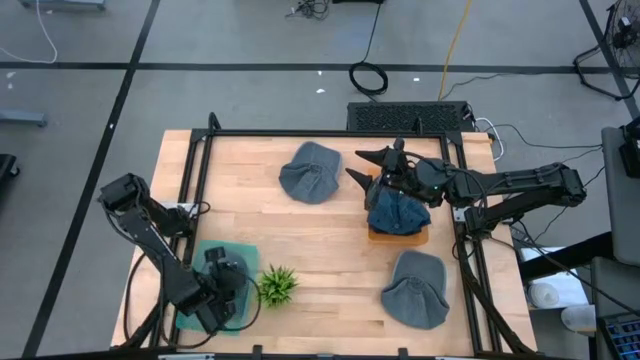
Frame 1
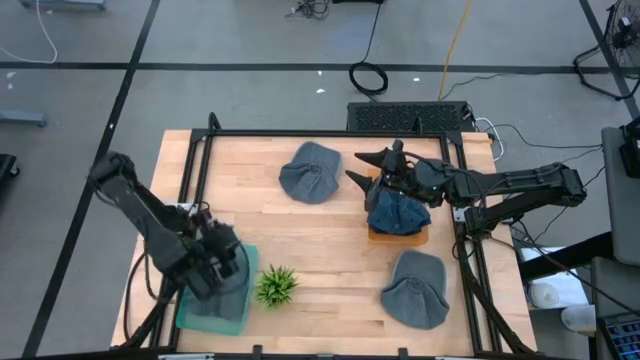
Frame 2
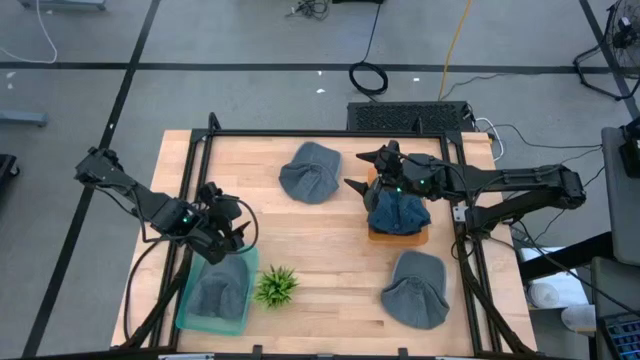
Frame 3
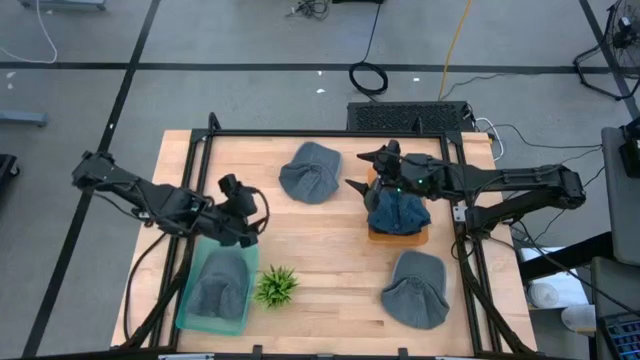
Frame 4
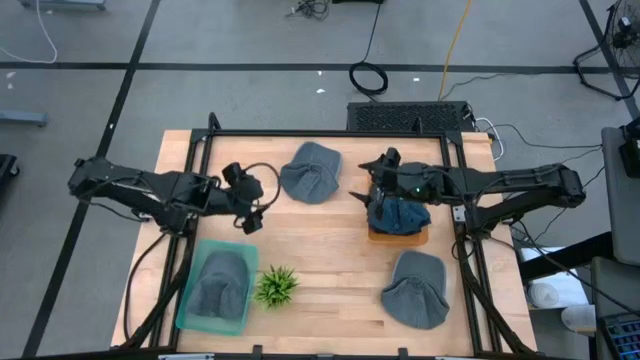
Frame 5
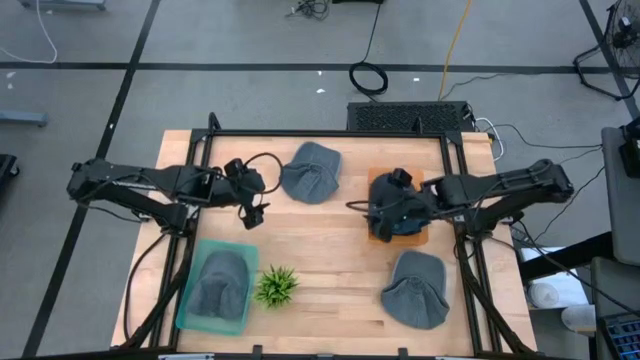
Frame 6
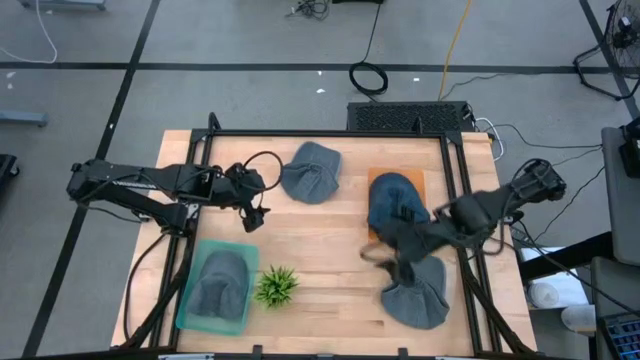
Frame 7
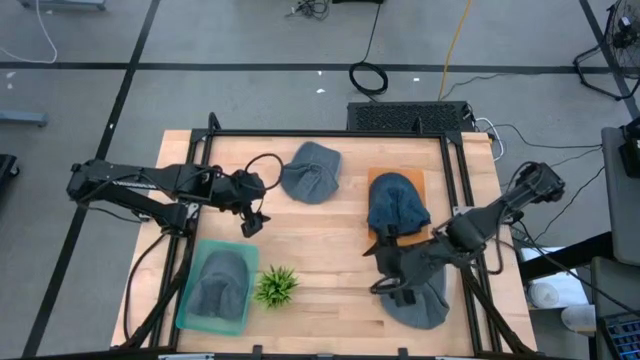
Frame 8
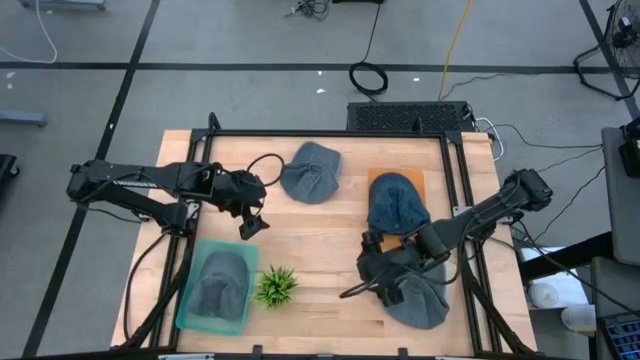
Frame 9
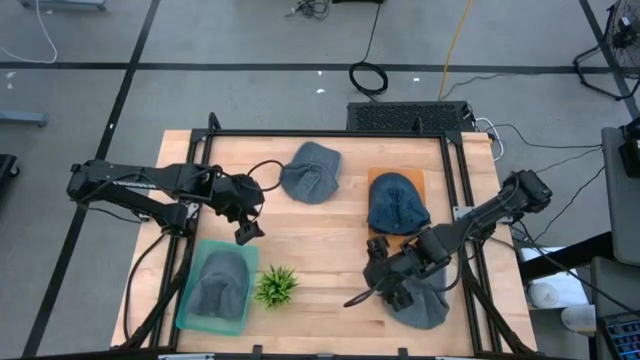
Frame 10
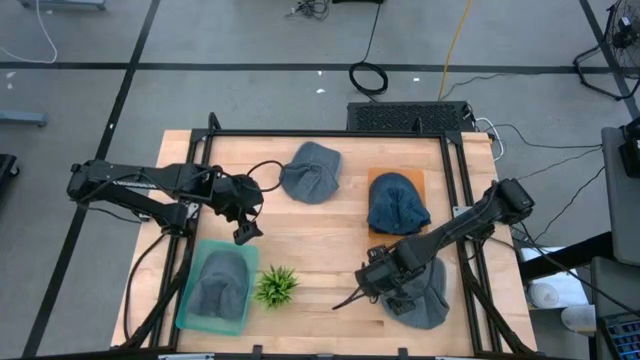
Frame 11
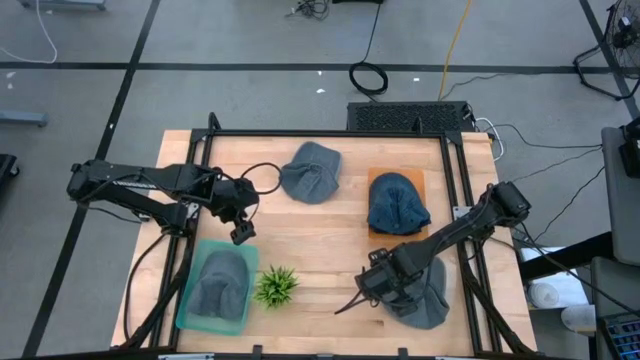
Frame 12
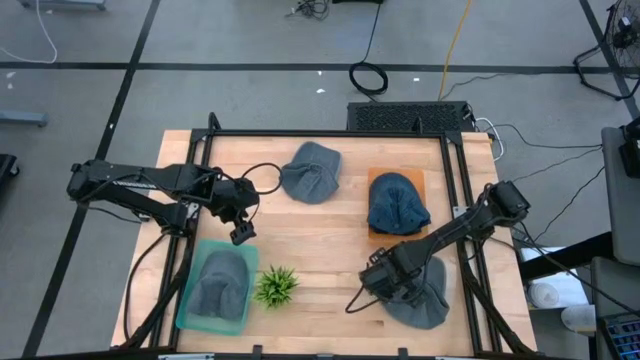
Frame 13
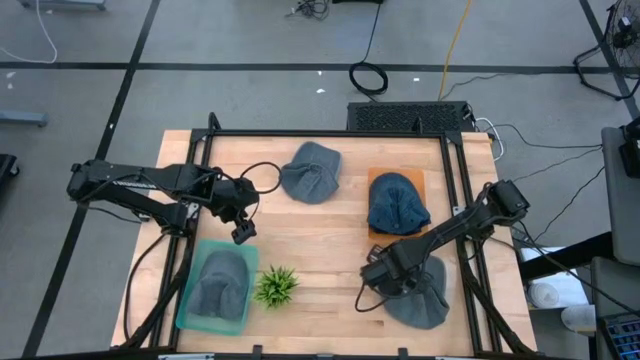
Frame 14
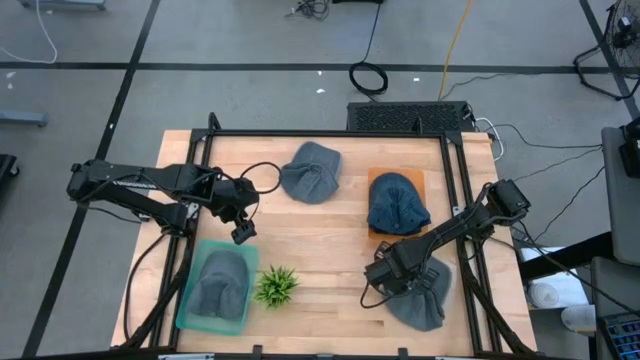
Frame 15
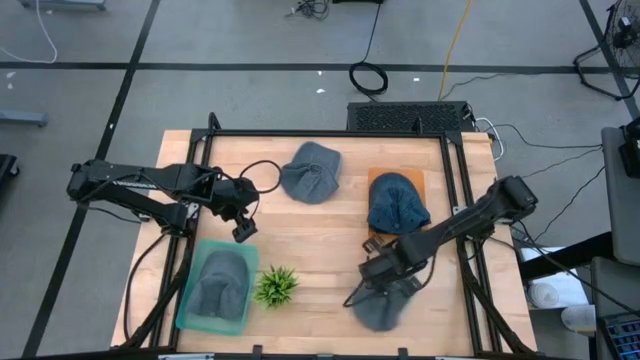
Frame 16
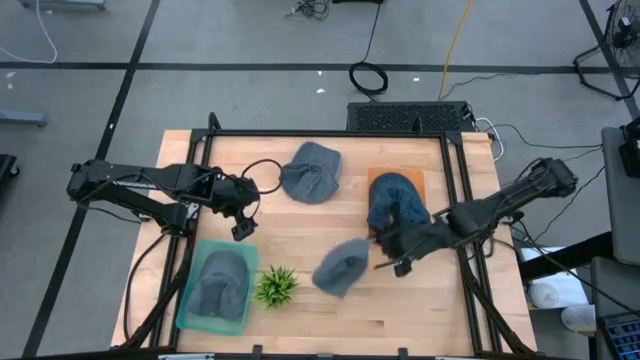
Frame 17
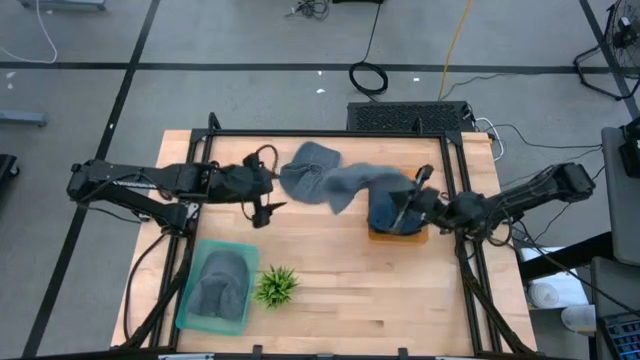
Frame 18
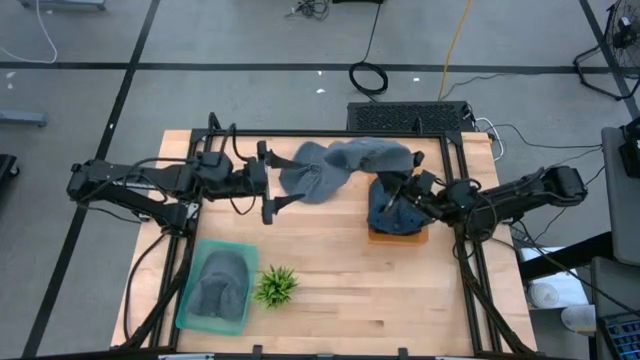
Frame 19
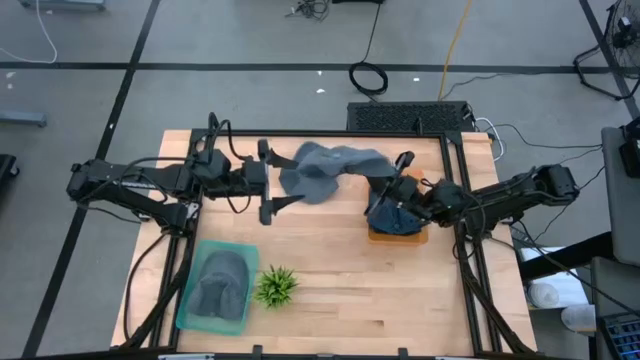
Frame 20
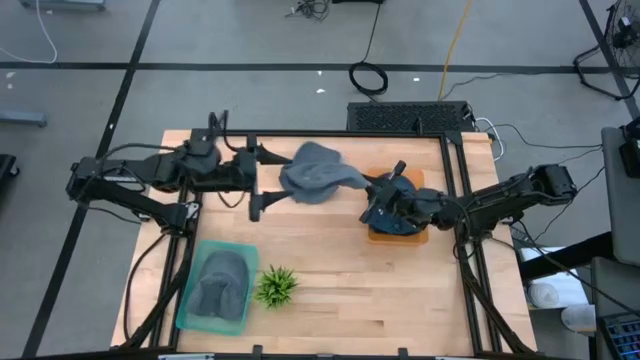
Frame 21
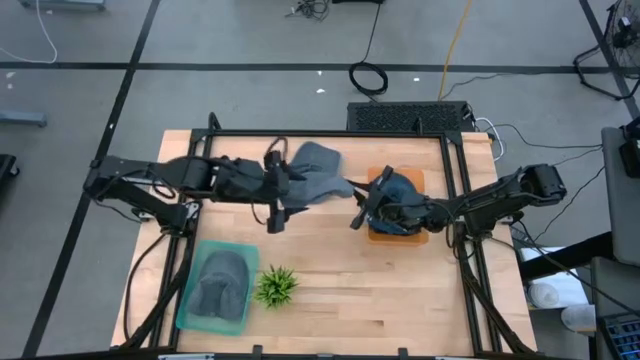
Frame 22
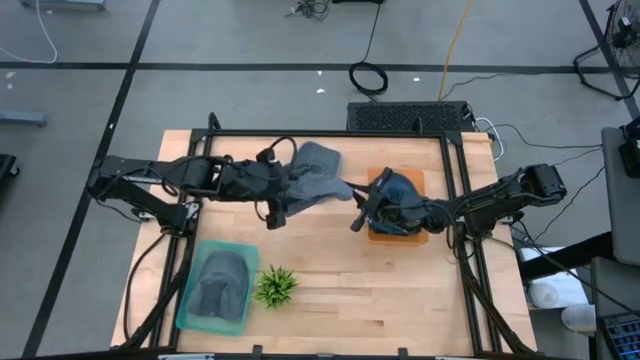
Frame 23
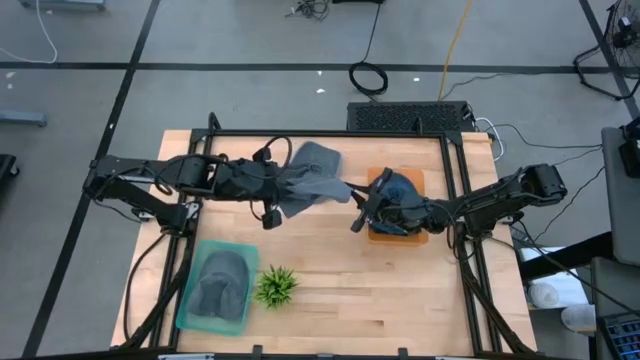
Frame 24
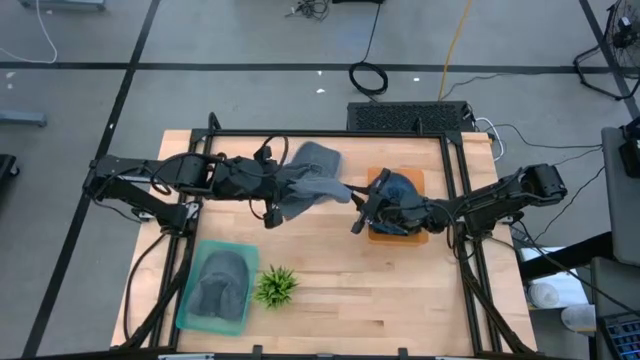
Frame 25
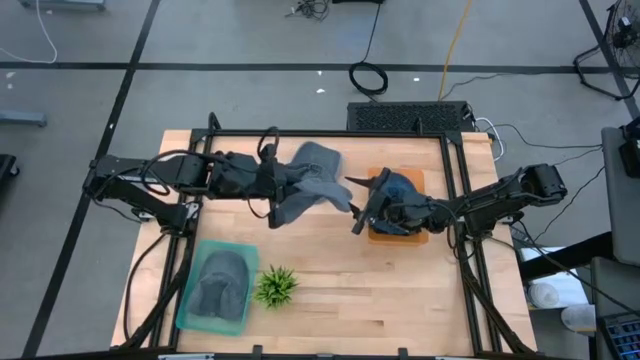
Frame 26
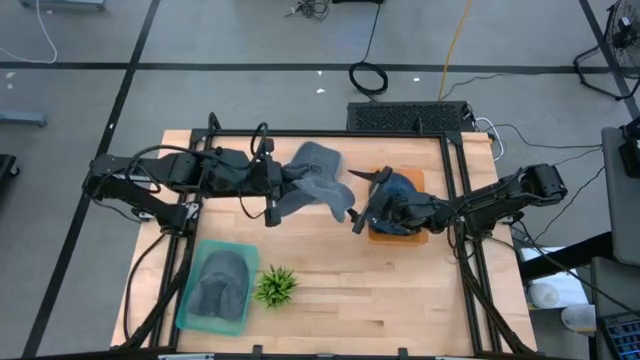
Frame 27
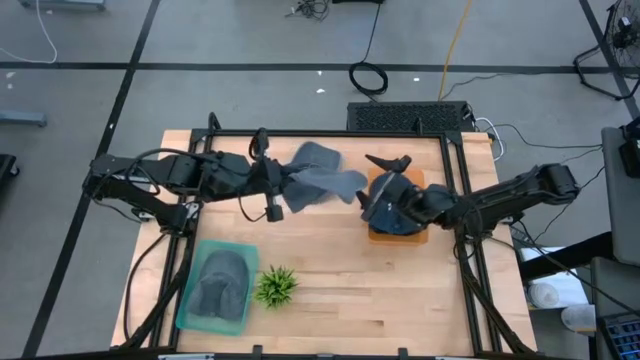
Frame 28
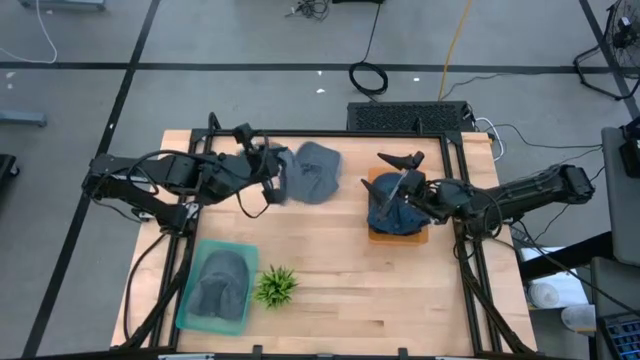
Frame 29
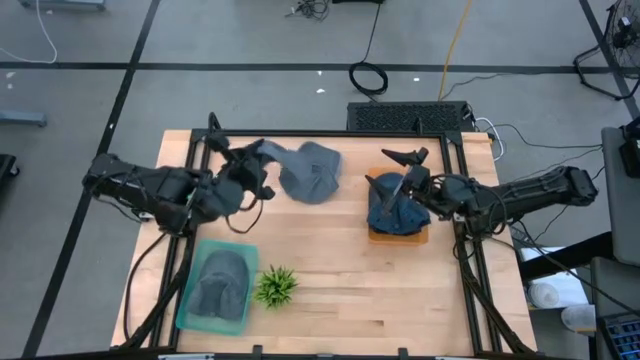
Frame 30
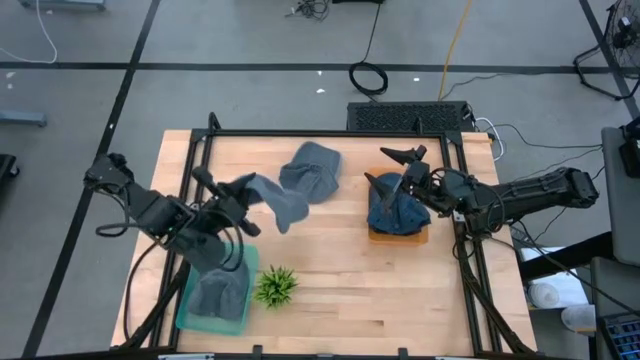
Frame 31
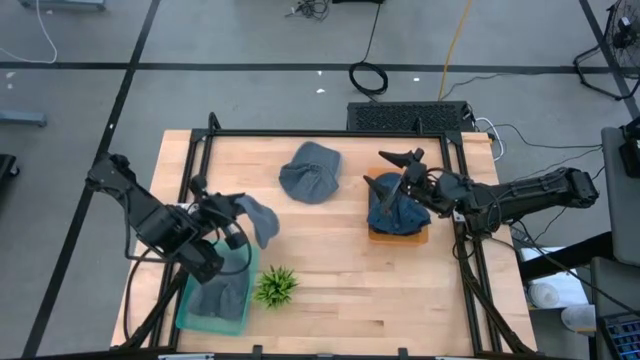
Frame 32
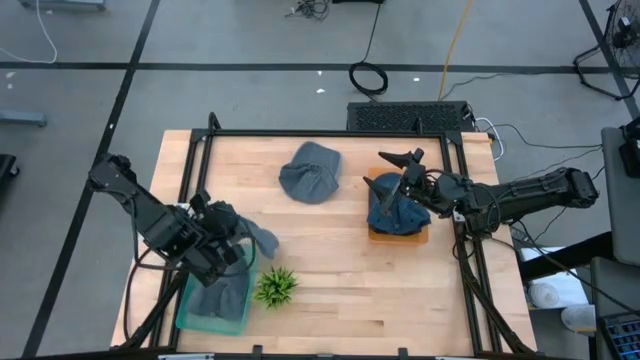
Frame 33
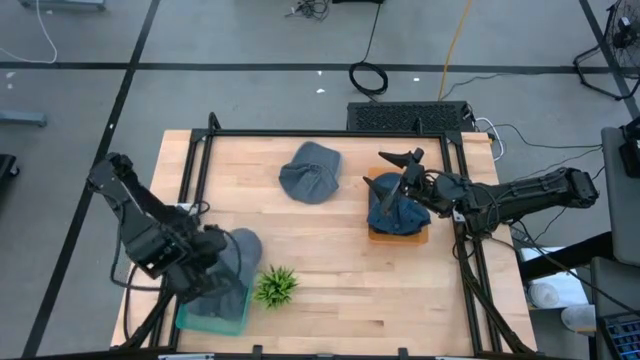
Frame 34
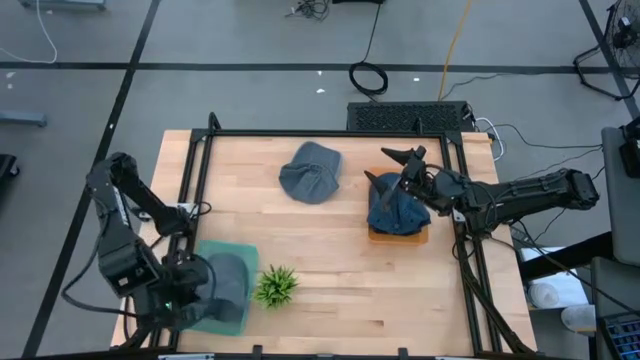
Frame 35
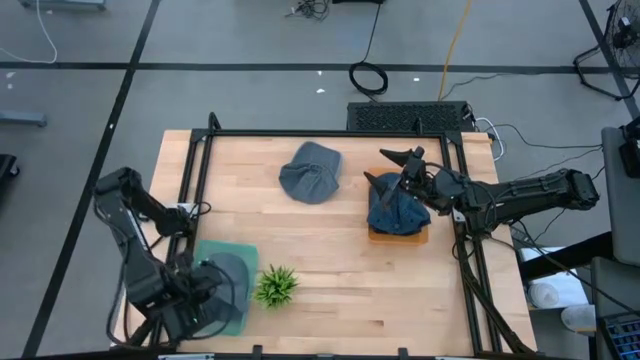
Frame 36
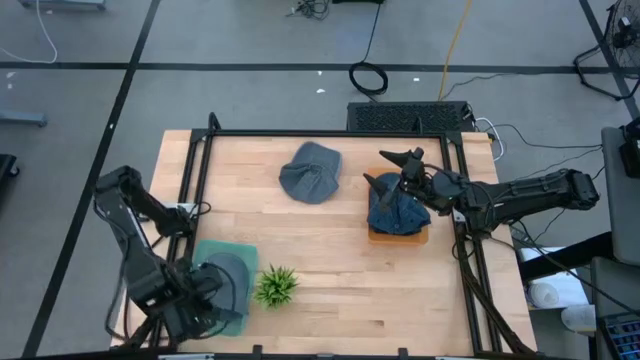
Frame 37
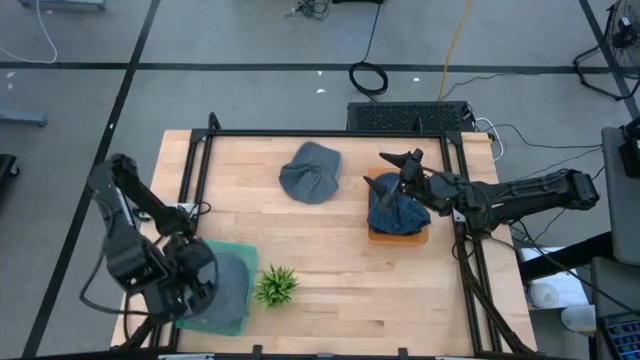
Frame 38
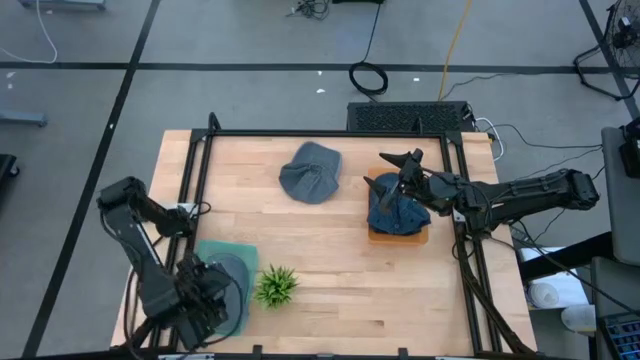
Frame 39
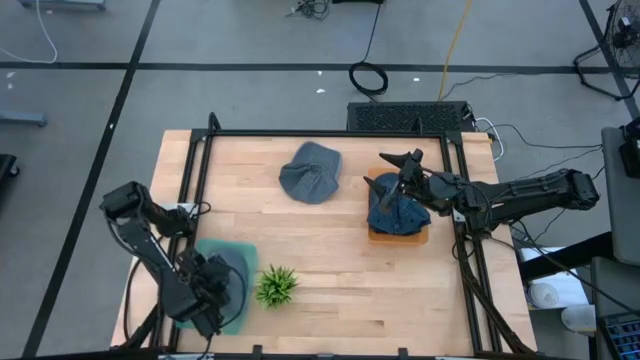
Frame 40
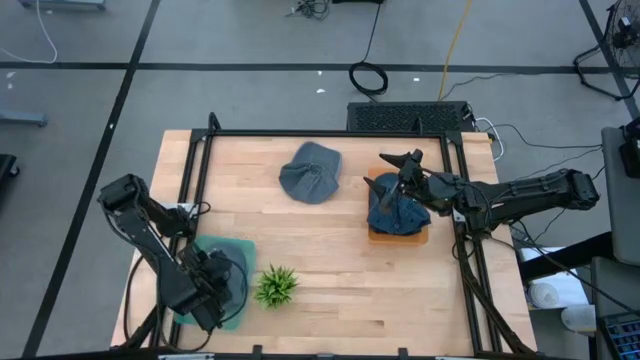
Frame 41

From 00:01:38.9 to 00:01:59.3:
Task: Pick & Place hat
Put the bottom gray cap into the green bin

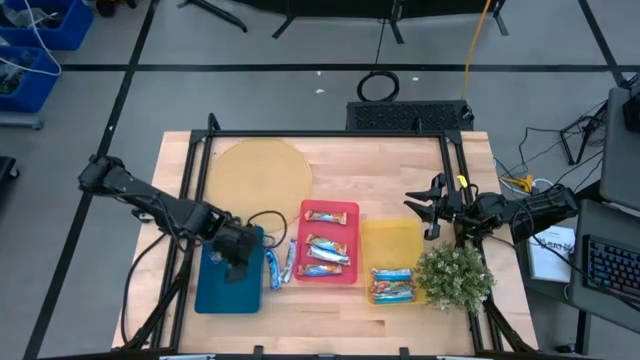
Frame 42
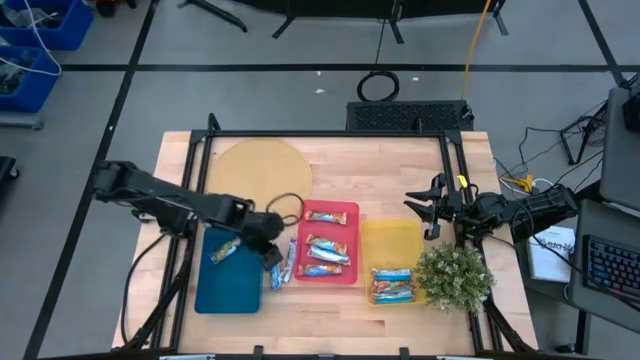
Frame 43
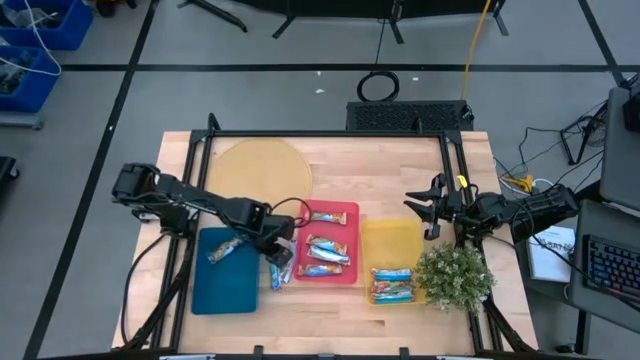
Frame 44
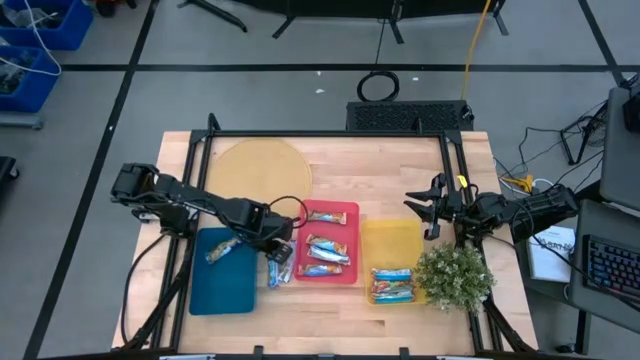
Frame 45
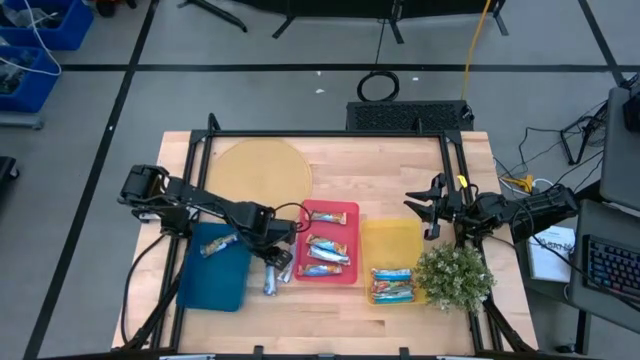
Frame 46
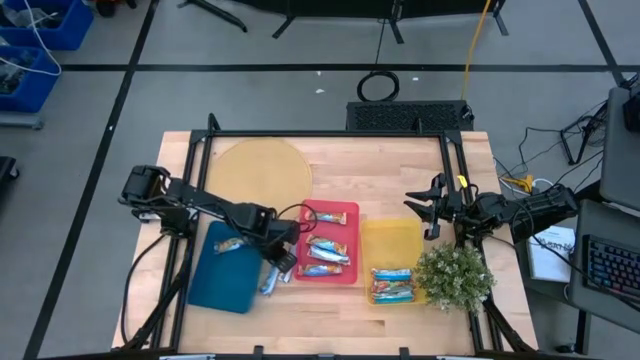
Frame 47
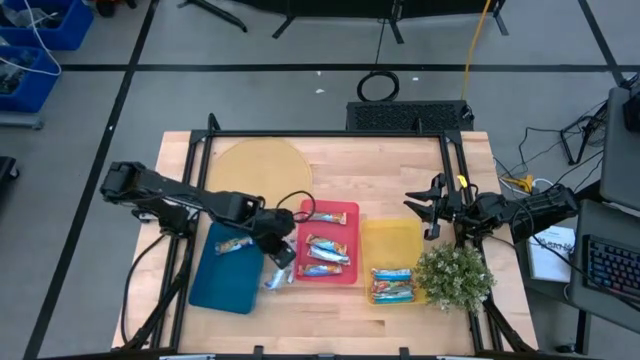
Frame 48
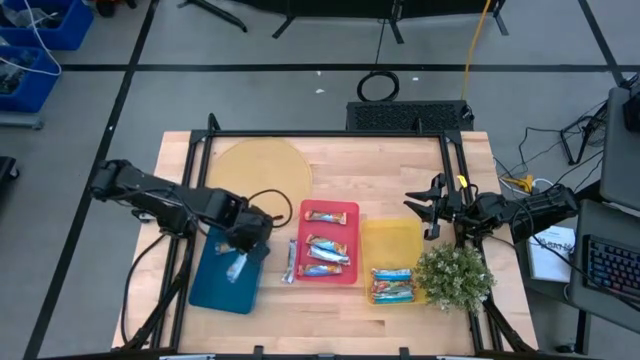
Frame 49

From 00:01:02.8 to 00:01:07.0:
Task: Pick and place Granola Bars by type
Put the blue granola bar into the blue bin
